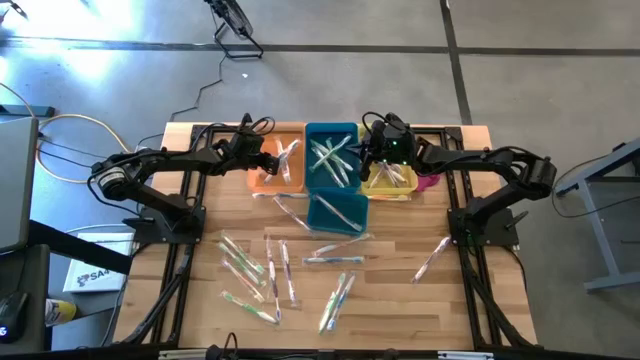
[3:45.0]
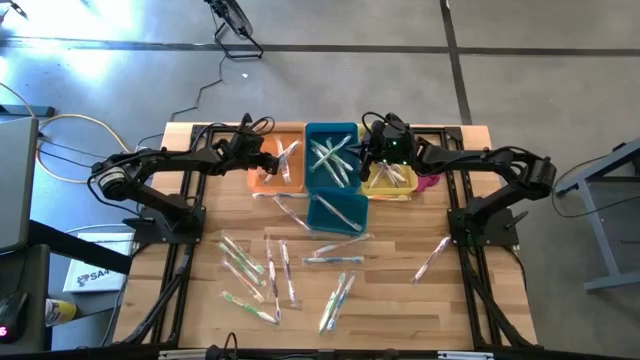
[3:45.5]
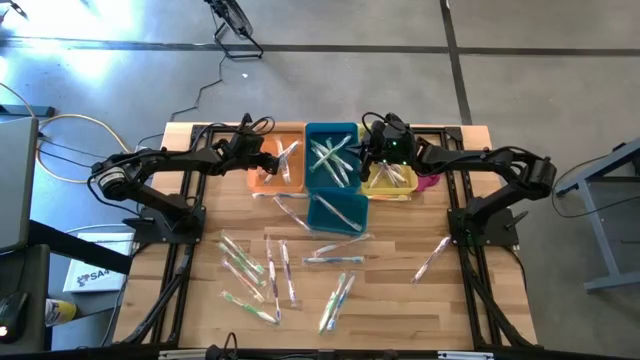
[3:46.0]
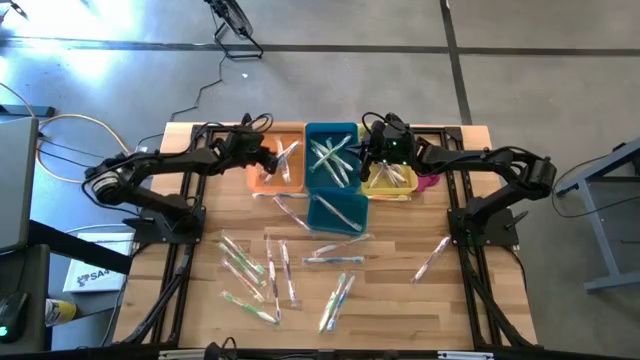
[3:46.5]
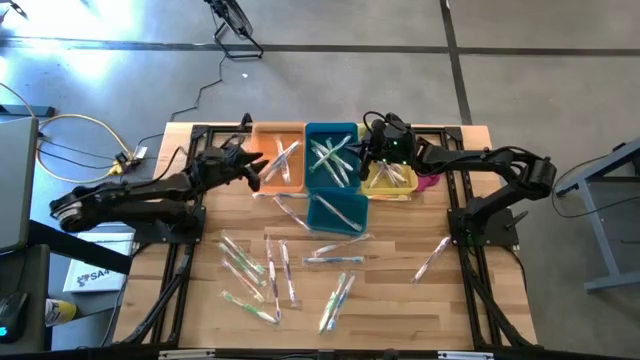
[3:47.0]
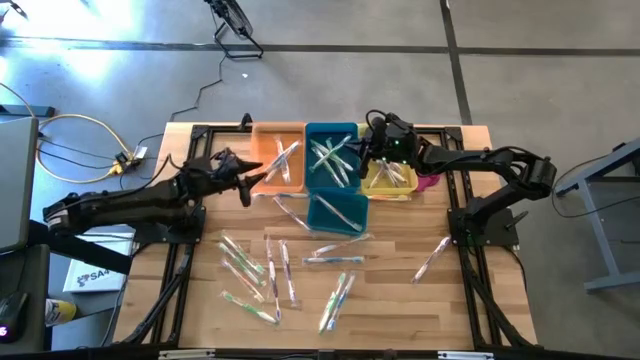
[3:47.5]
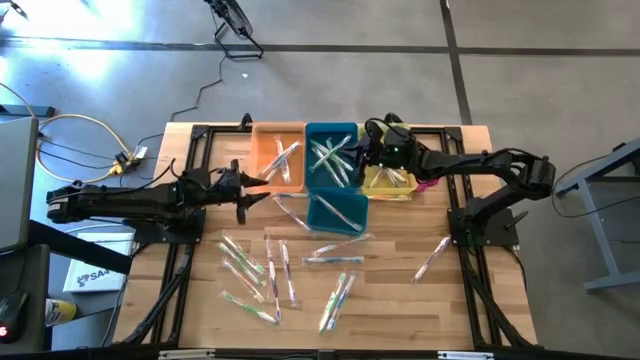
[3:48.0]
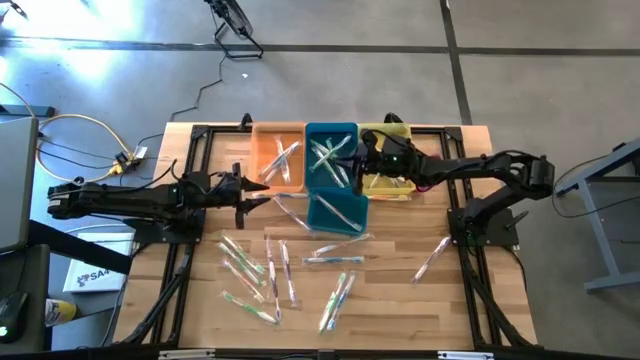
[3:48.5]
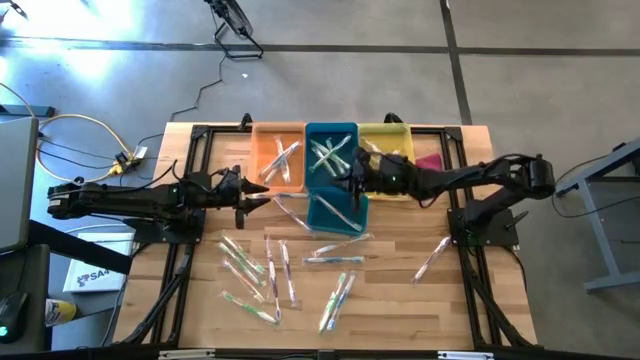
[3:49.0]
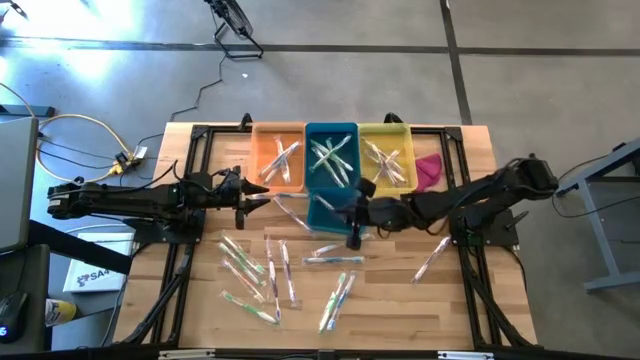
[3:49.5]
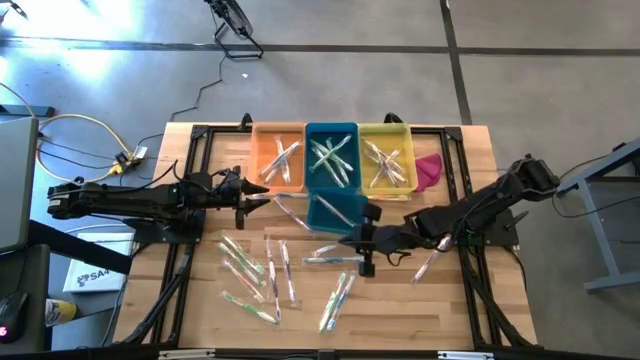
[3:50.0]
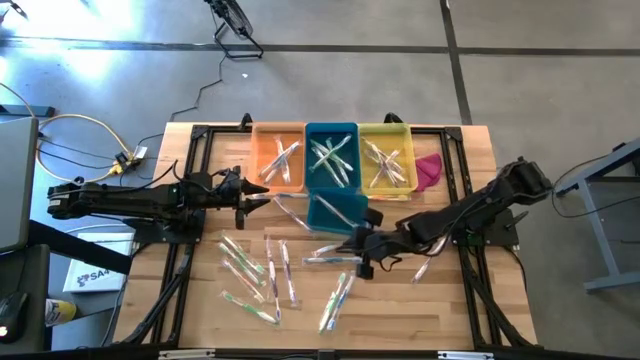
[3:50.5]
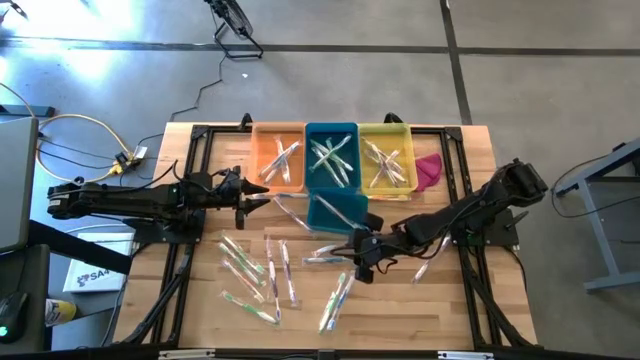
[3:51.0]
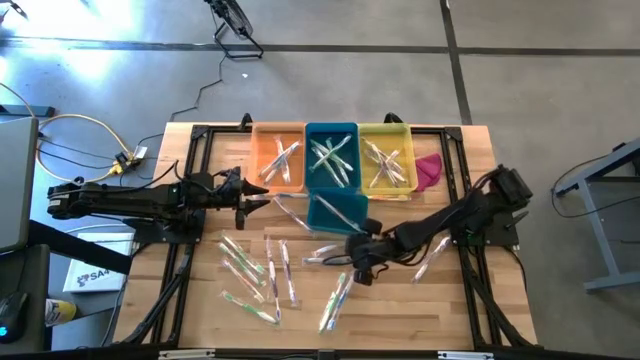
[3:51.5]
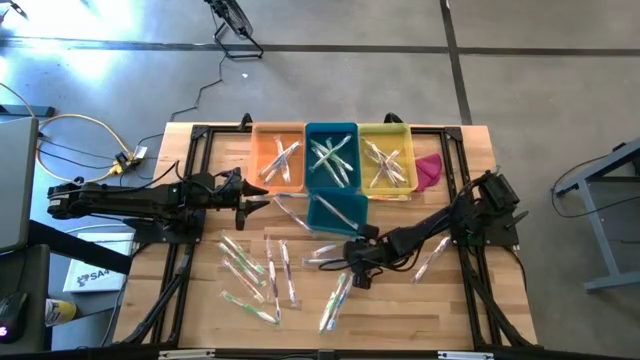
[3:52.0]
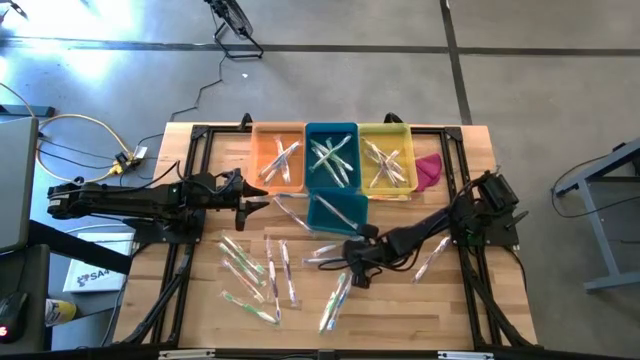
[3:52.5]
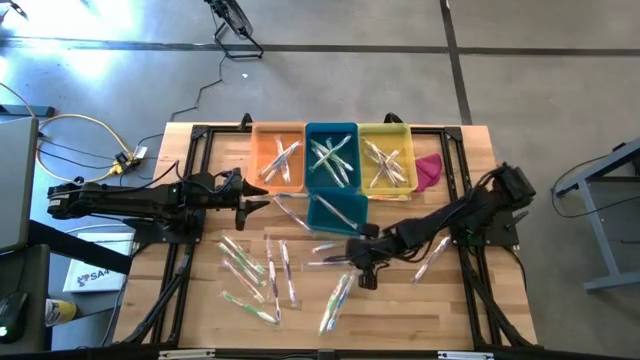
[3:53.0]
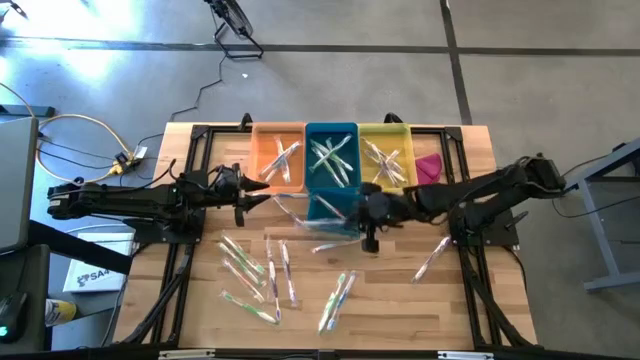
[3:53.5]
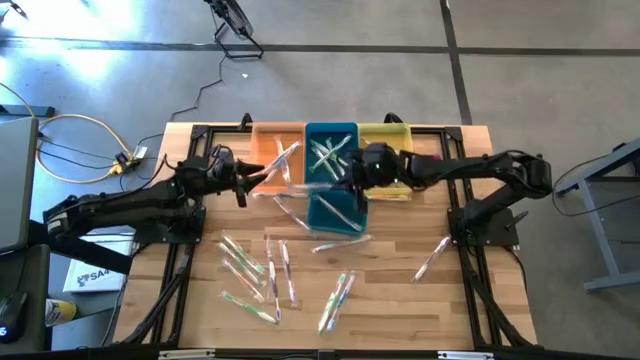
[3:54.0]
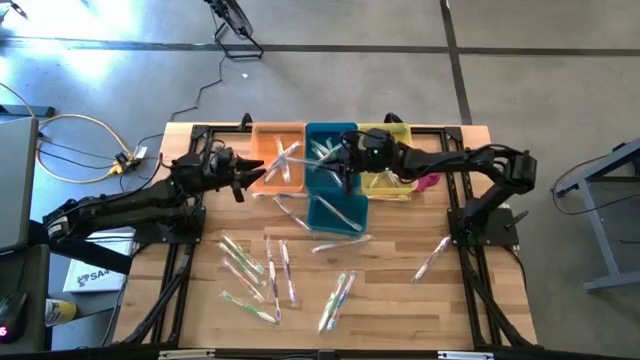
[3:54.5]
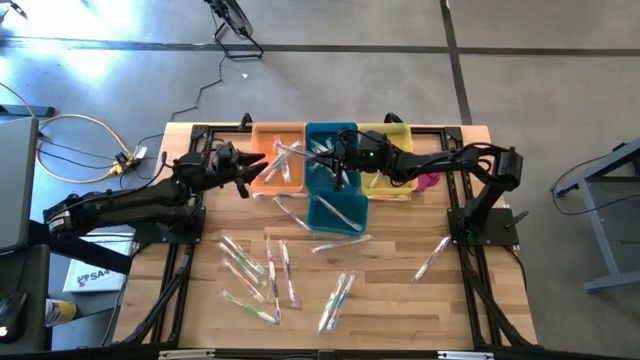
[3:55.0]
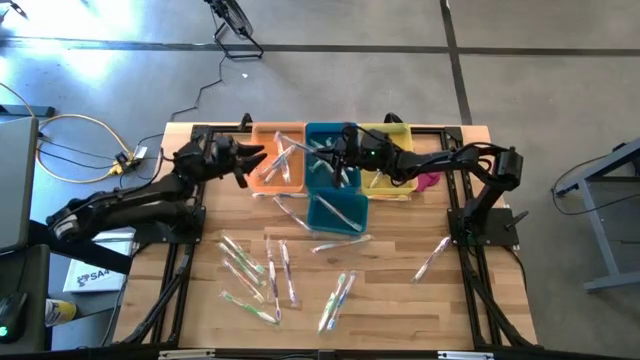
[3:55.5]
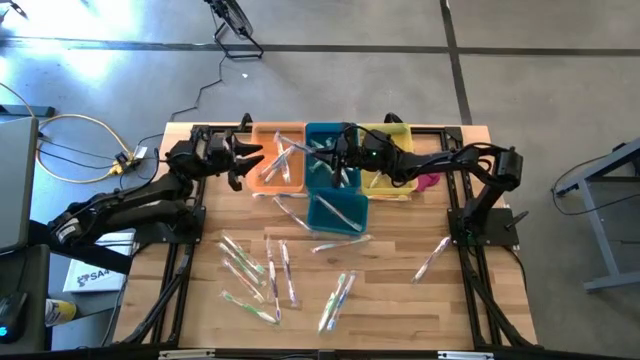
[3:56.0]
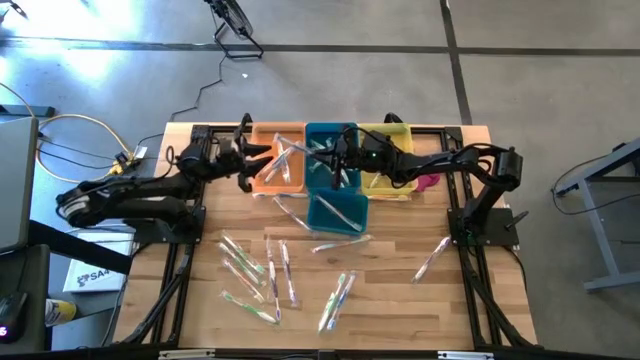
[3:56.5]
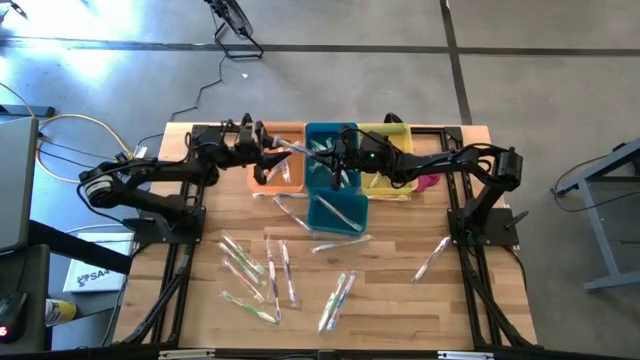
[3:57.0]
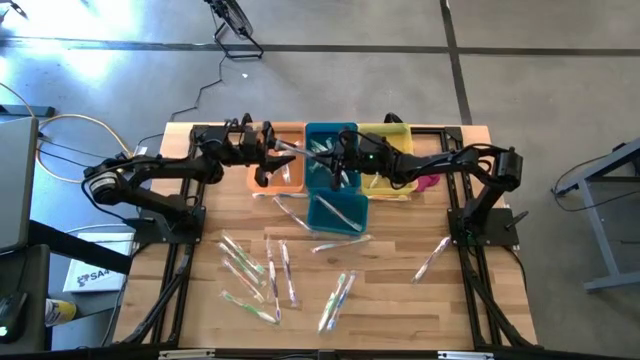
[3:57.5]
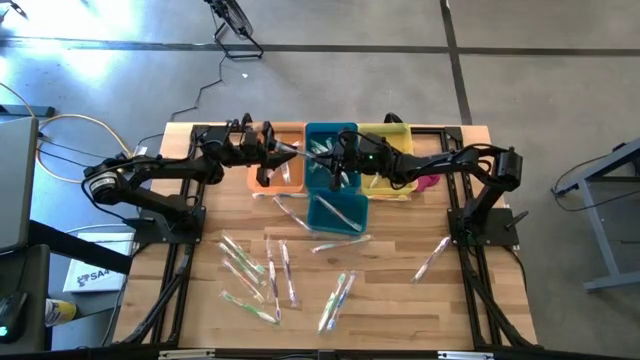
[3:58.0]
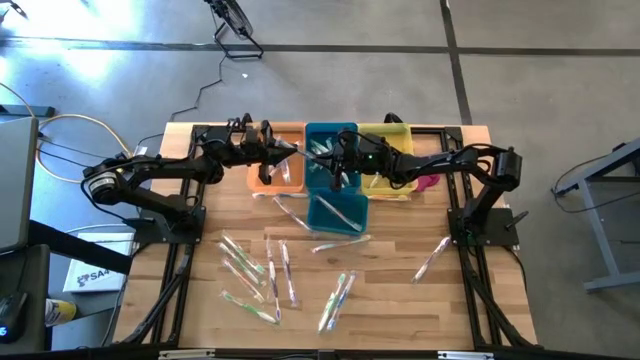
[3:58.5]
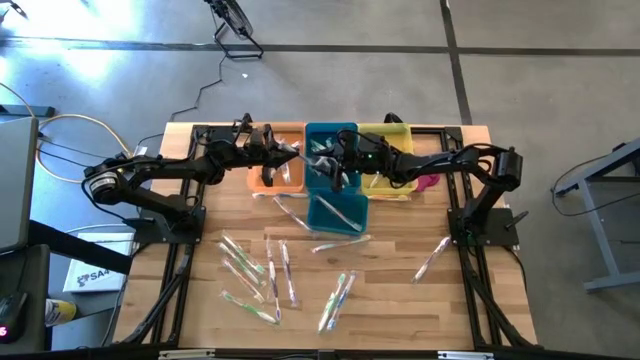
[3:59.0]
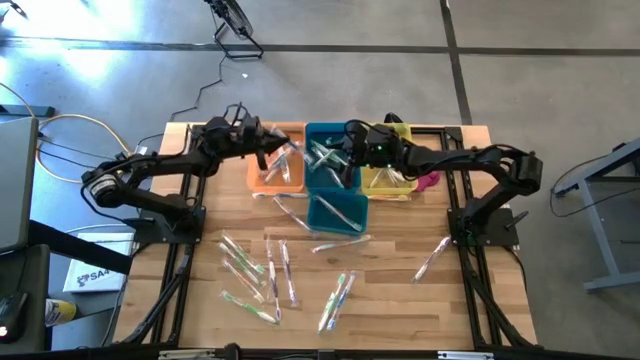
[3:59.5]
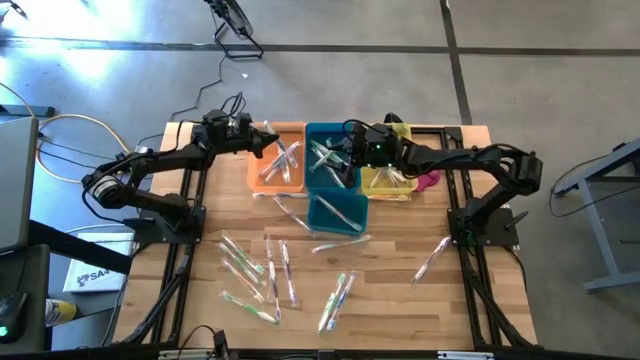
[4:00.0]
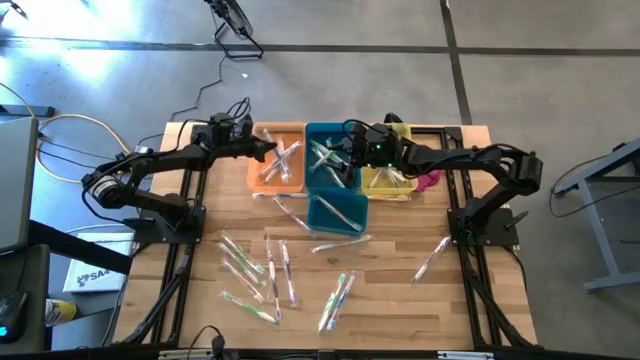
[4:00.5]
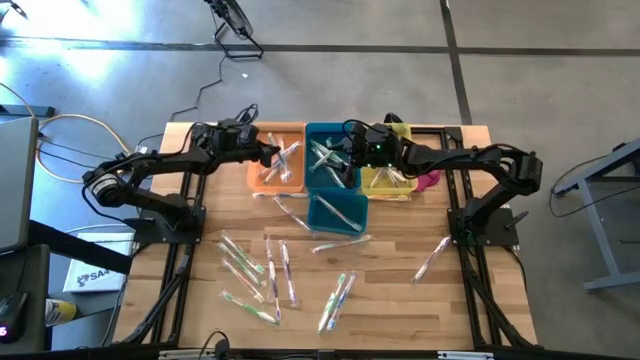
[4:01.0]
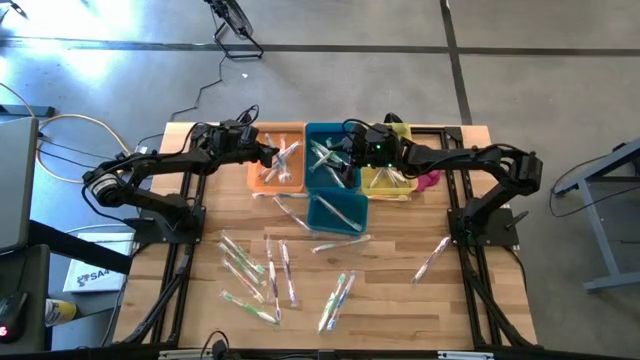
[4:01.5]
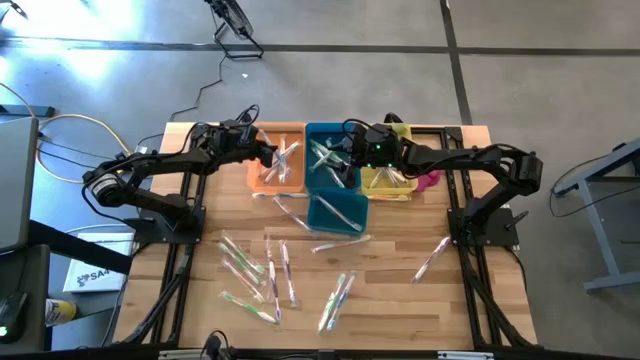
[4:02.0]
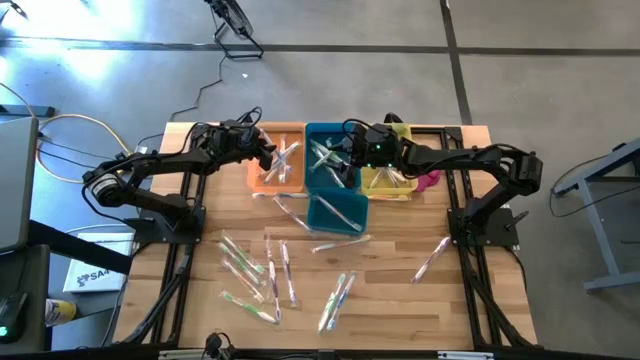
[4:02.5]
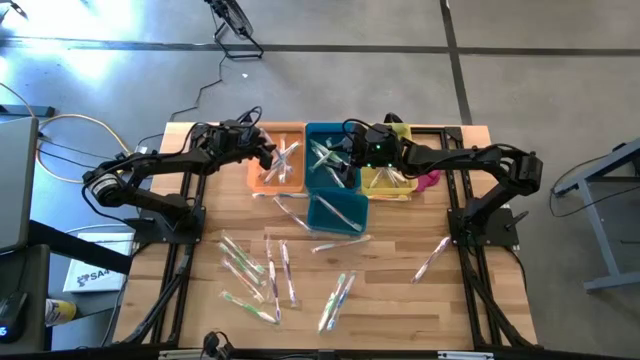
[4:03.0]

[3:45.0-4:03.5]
Task: Pick & Place Toothbrushes
Put the blue toothbrush into the orange bin

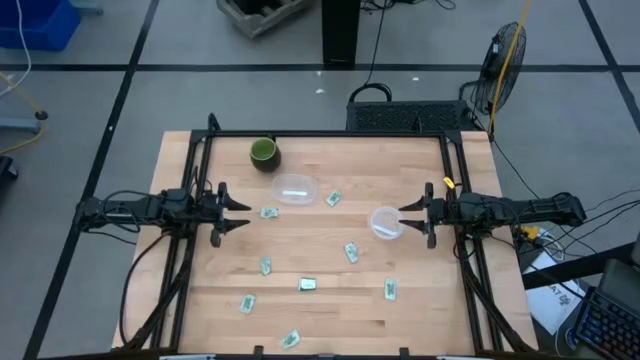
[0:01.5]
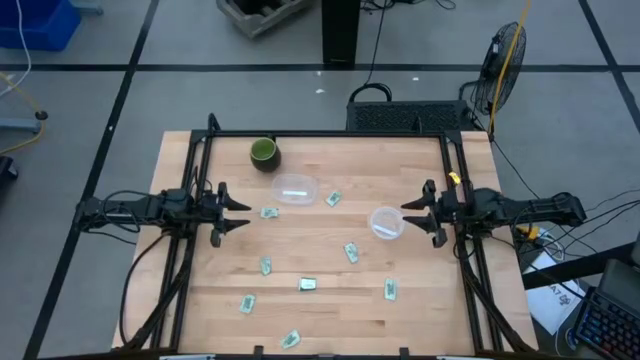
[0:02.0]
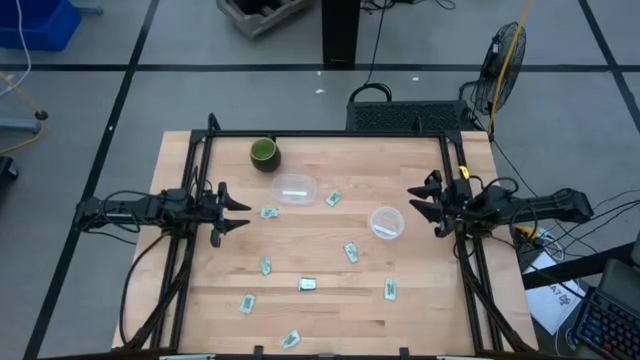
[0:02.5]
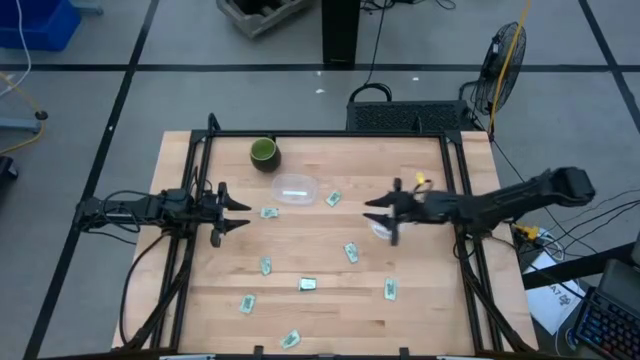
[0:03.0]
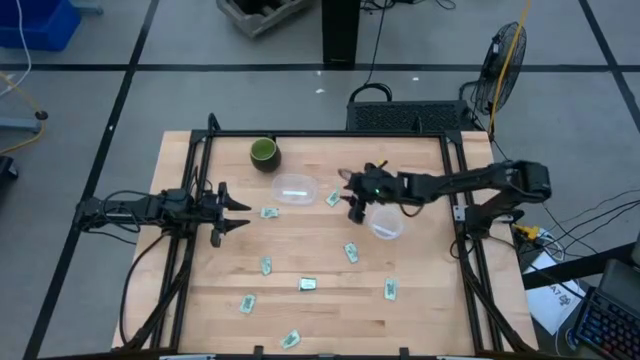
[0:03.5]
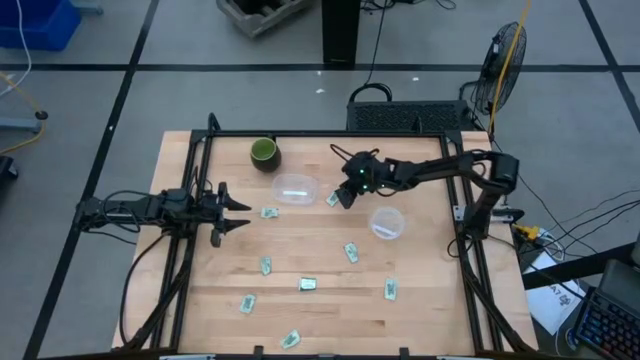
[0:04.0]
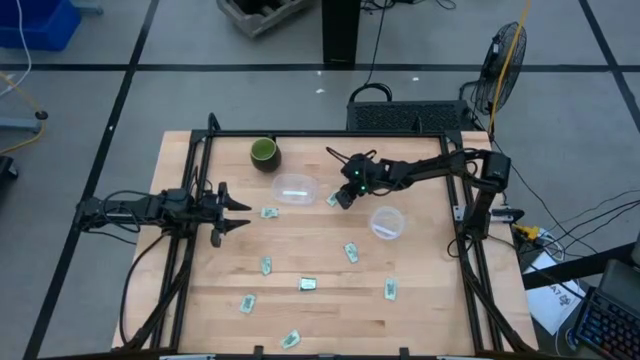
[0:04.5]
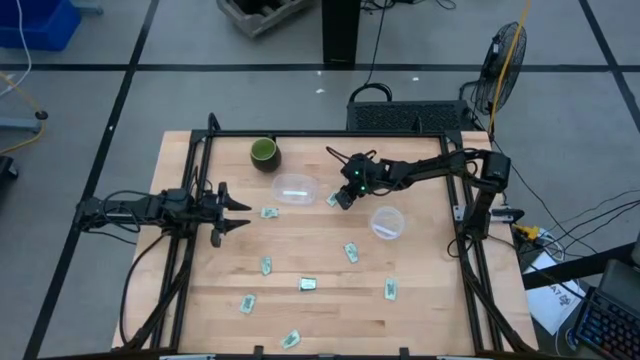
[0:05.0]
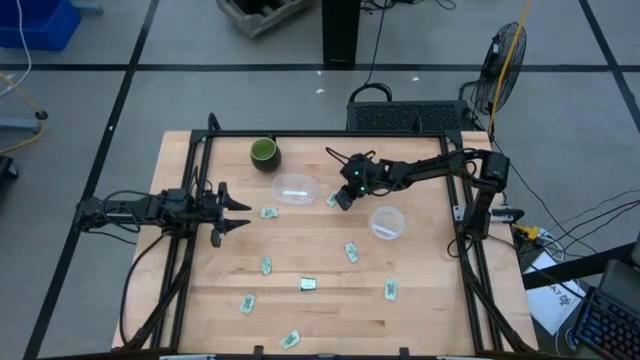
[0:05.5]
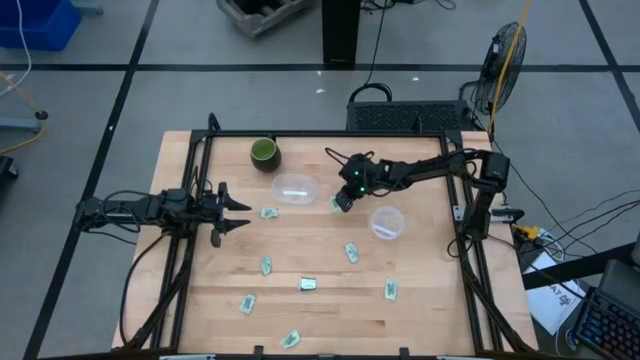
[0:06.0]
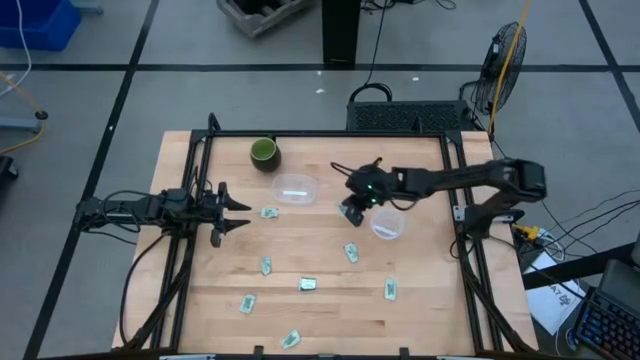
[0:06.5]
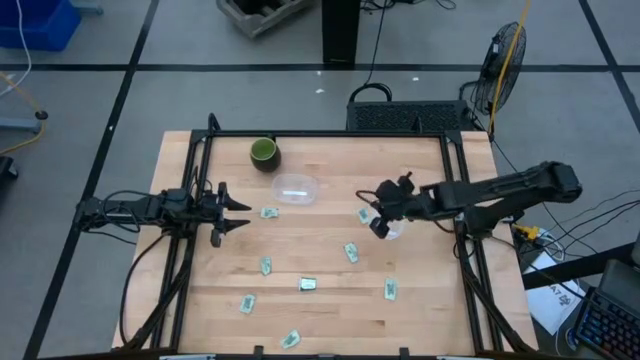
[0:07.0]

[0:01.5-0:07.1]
Task: Pick and place items into bin
Put the light green stevia packet into the right transparent bin
